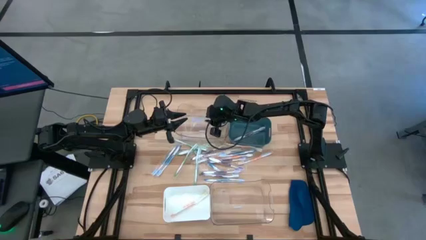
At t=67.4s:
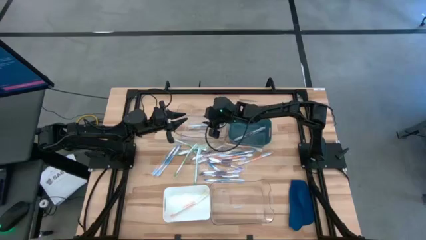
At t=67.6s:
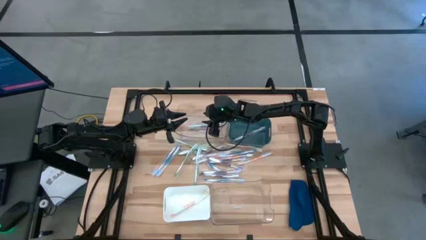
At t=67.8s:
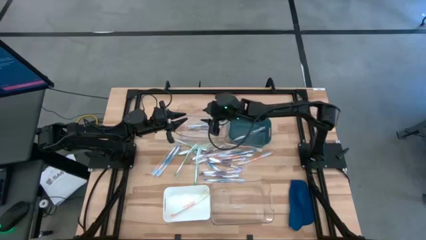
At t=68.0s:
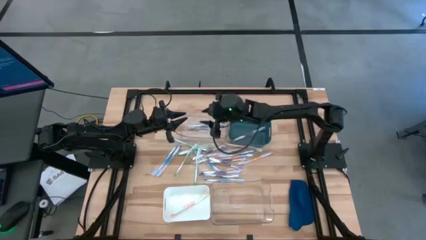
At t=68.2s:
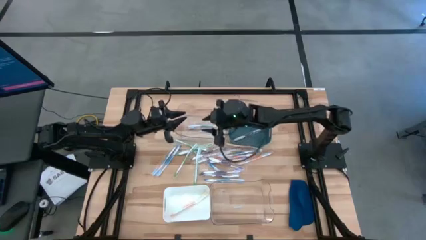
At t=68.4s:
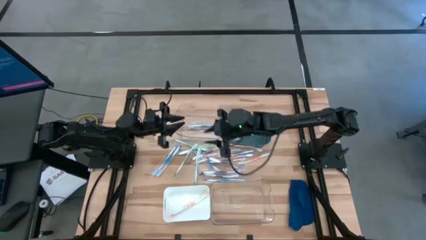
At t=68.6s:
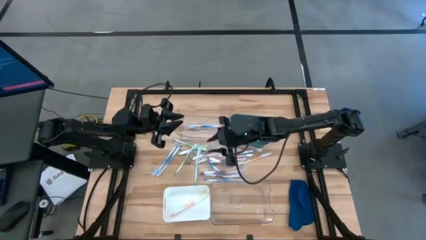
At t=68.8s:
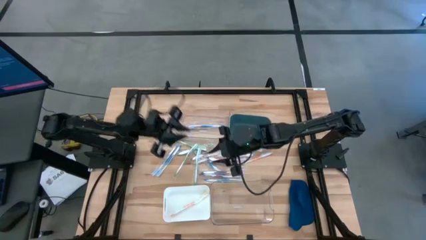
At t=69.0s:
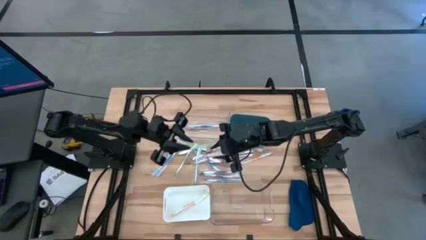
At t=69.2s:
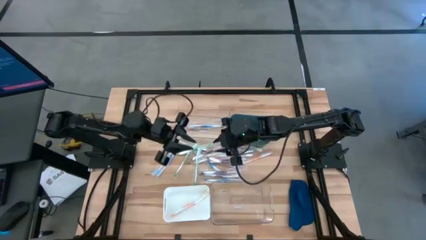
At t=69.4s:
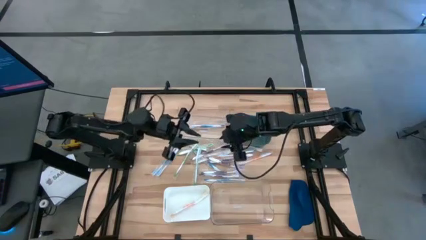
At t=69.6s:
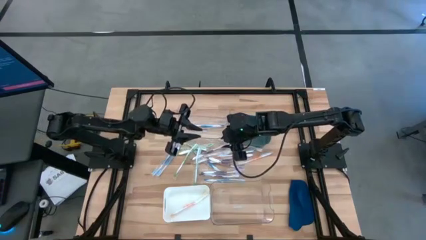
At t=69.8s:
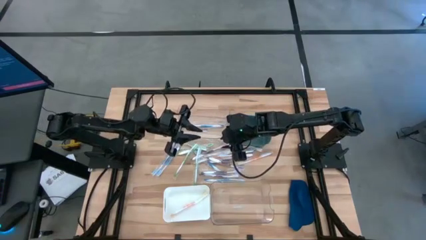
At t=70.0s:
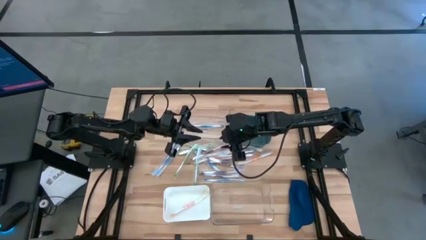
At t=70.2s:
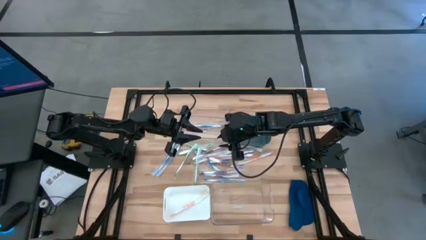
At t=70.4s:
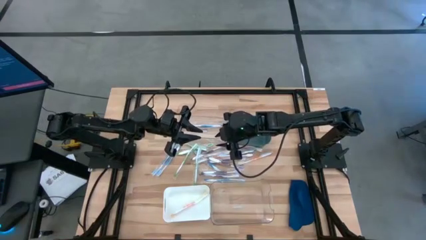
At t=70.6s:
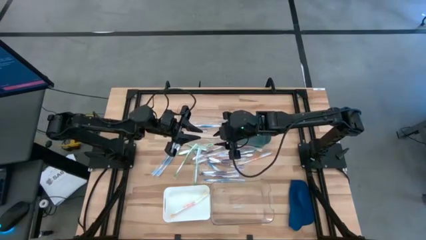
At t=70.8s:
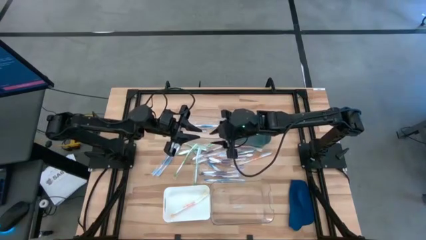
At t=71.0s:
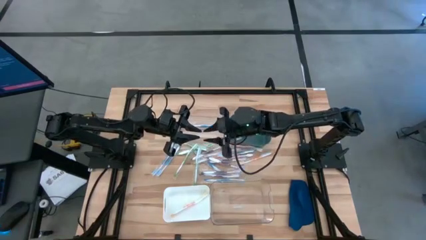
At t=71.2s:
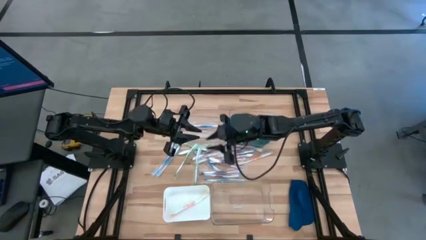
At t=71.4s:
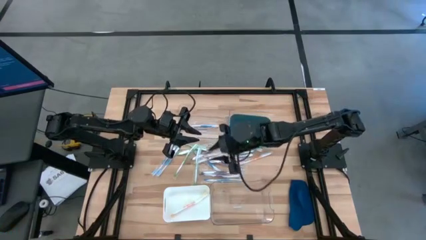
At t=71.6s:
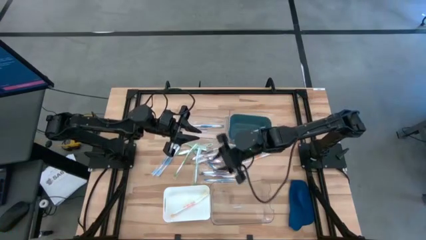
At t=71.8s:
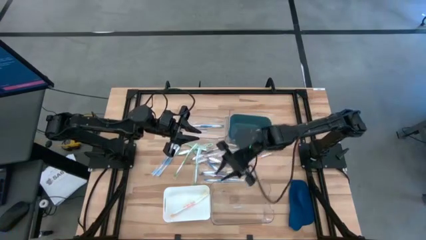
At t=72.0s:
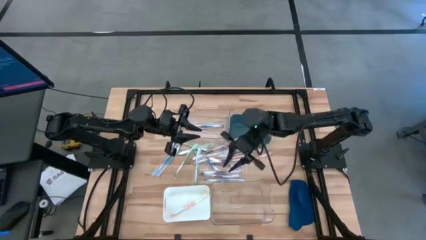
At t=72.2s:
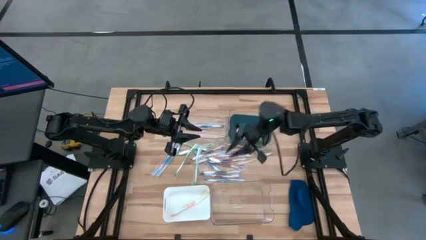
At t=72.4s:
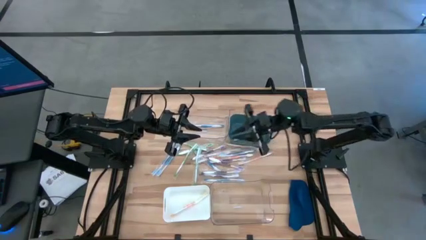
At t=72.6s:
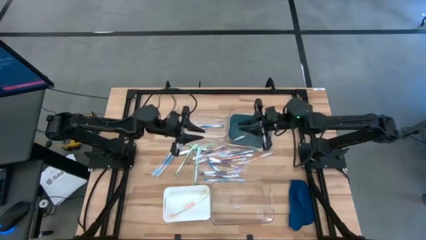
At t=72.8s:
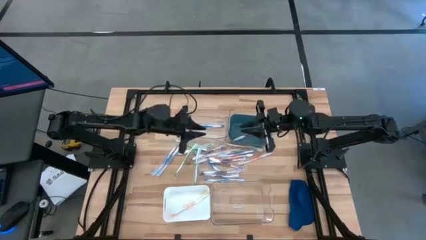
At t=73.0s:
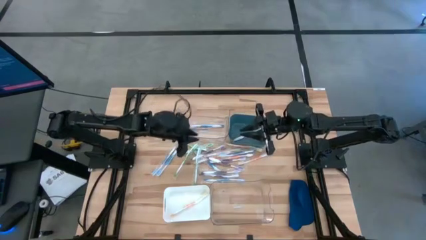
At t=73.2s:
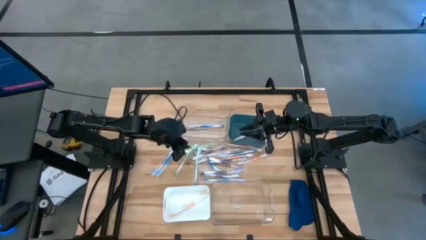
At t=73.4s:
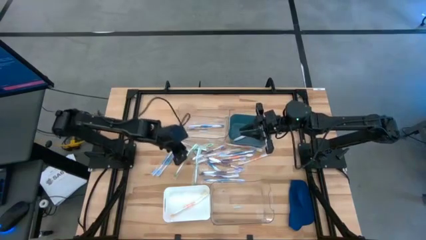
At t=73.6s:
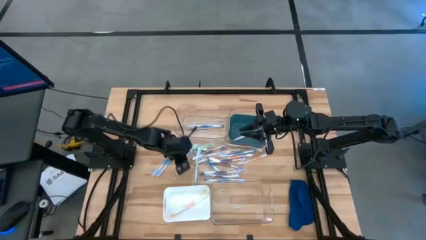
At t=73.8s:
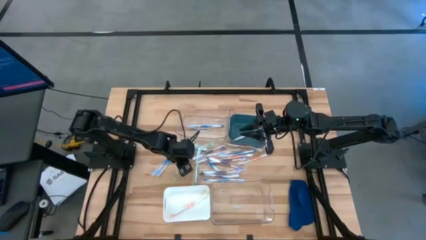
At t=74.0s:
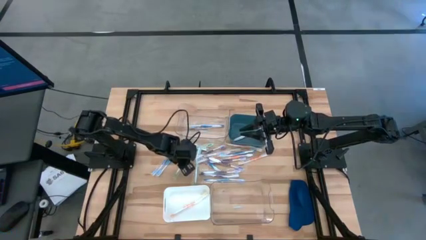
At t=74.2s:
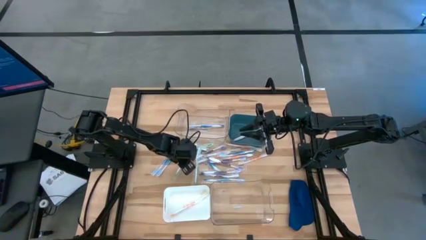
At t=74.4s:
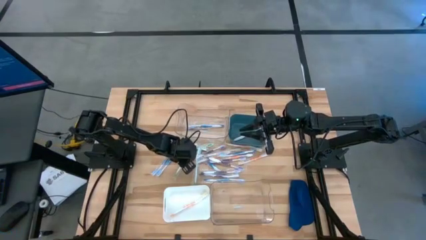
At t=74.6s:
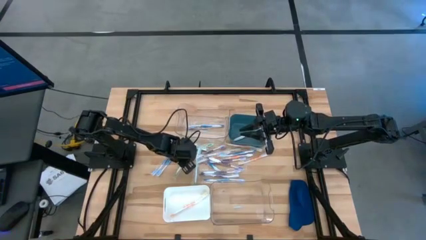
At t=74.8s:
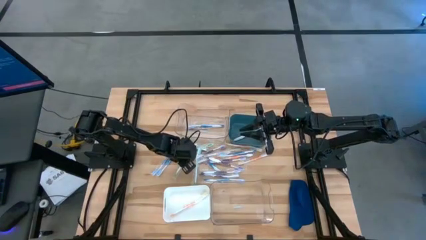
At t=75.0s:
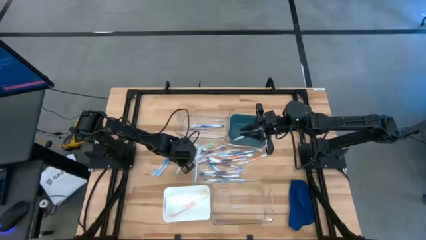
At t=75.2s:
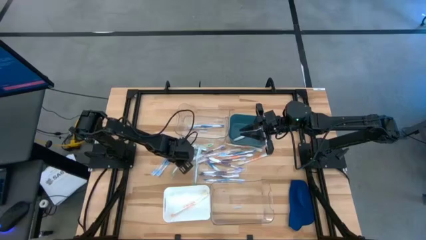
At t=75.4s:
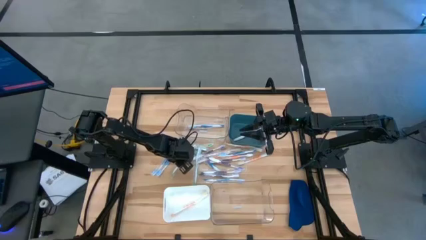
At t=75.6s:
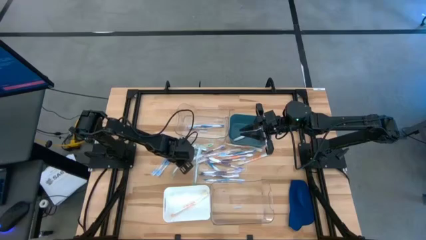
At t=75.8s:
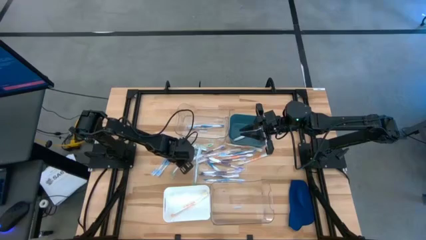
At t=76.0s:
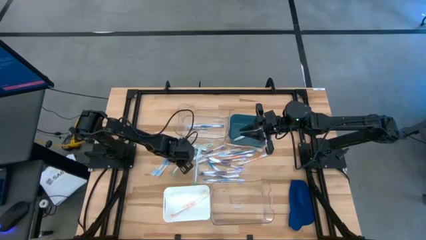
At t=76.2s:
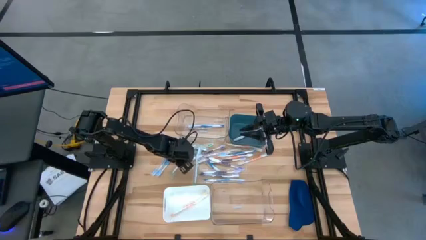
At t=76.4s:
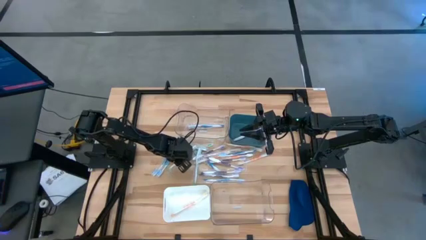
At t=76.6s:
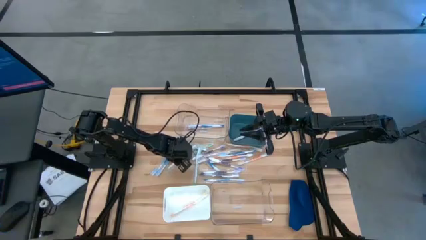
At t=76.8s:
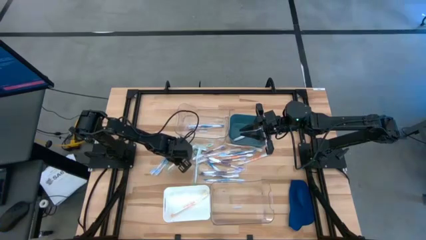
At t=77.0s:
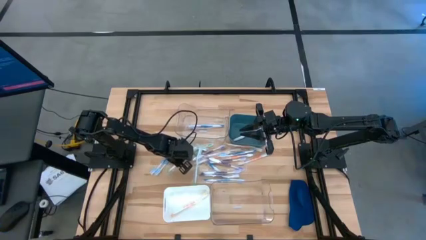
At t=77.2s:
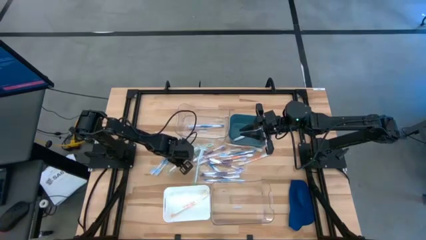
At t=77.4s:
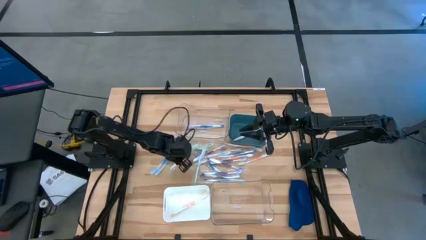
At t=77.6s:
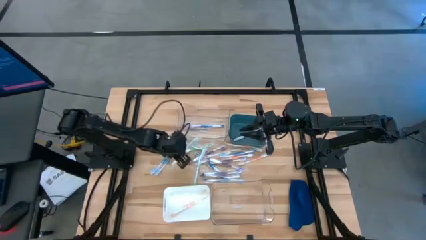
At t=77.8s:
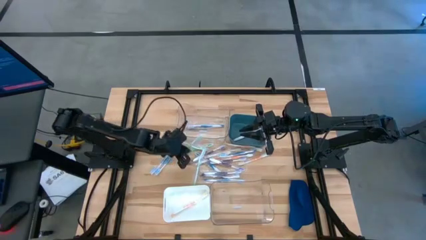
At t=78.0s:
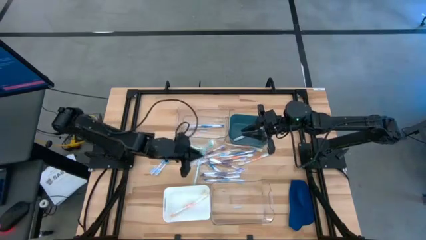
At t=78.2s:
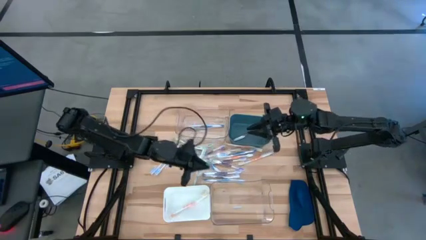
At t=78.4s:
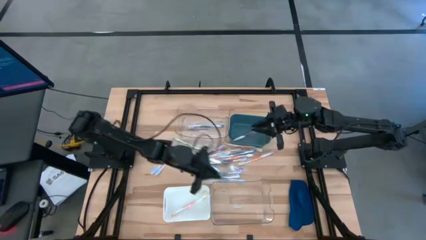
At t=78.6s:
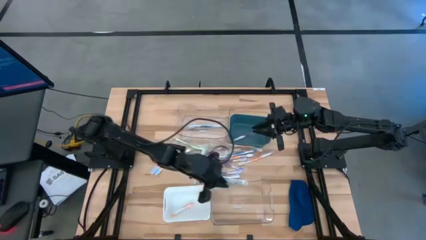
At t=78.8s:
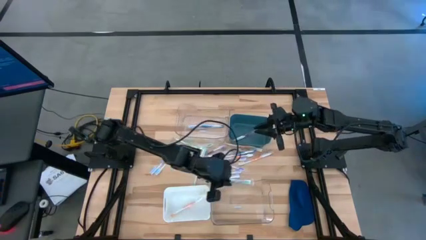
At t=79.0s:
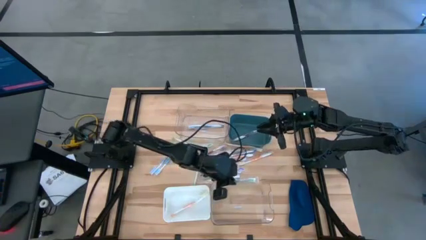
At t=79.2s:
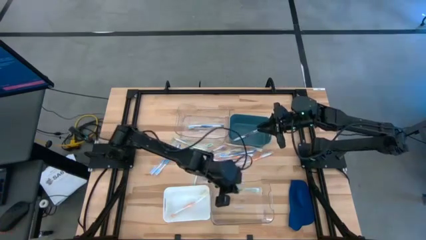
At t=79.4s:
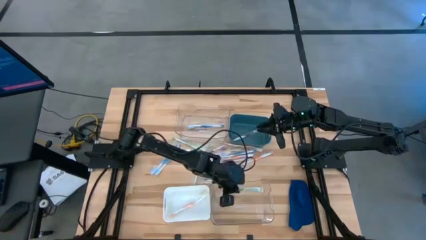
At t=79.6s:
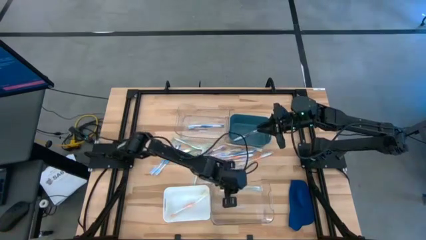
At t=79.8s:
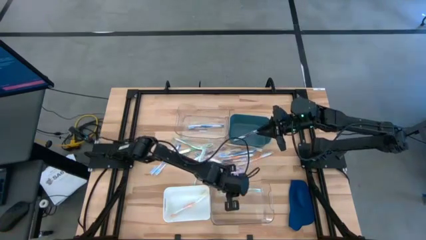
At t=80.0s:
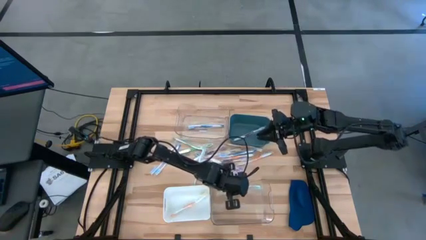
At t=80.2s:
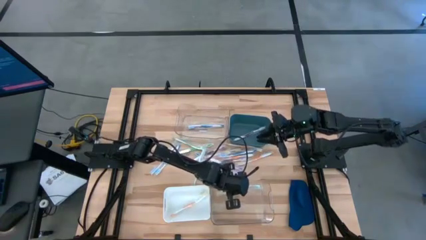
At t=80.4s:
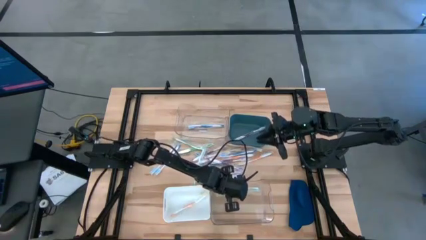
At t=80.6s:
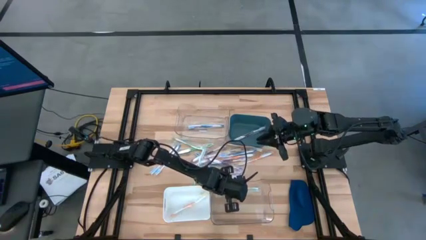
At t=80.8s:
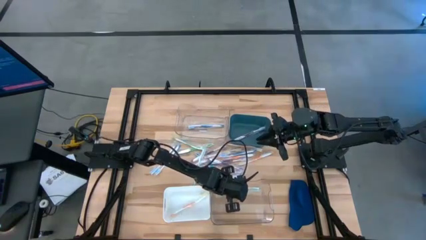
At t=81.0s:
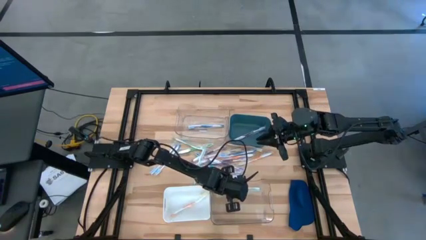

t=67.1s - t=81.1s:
Task: Pick & Place Toothbrushes
Put the green toothbrush into the bottom transparent bin
